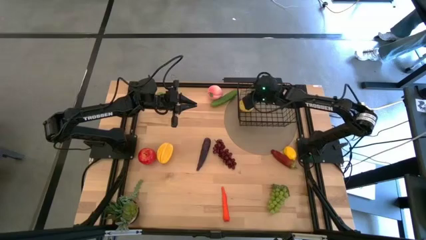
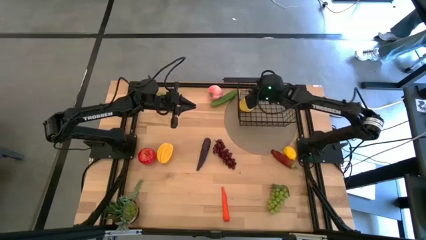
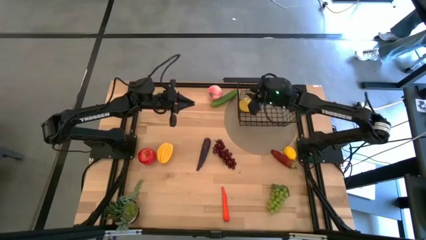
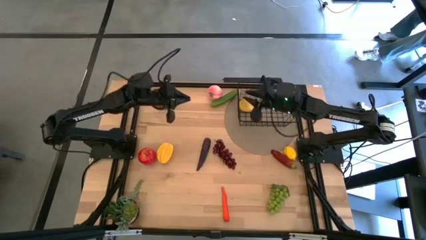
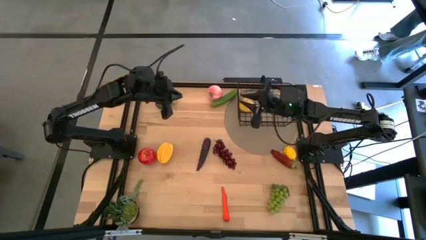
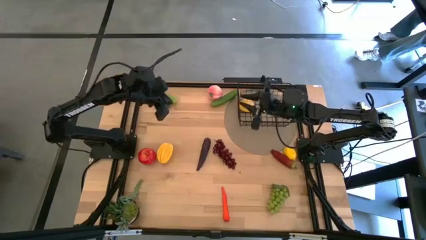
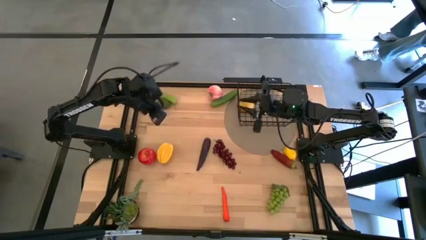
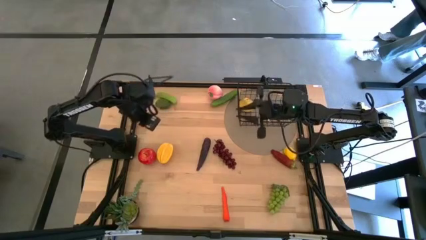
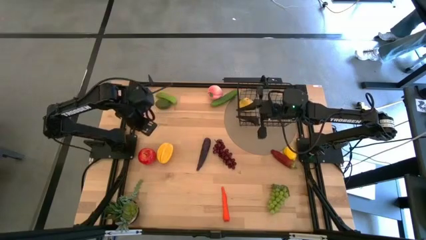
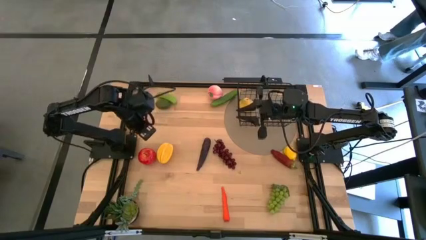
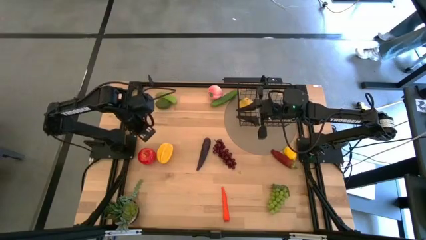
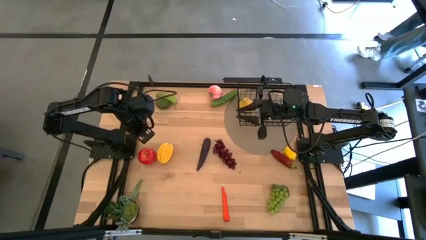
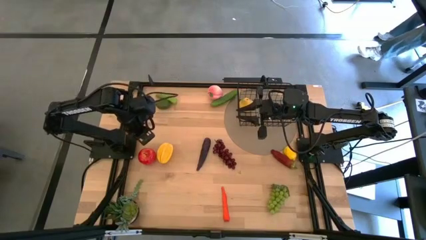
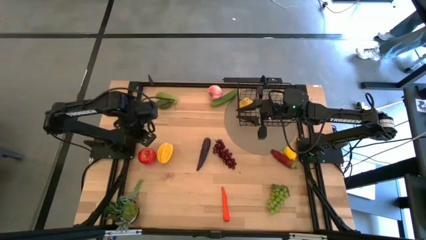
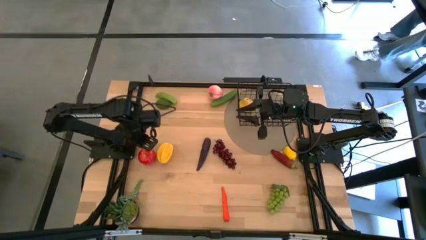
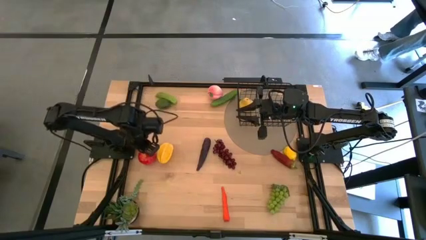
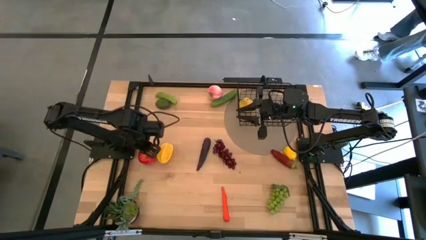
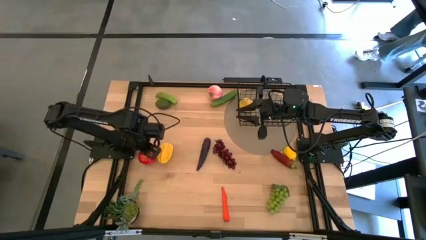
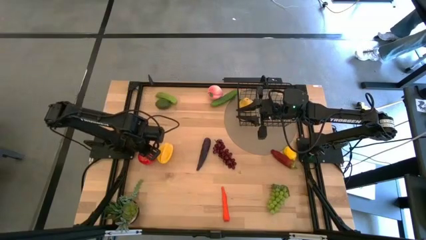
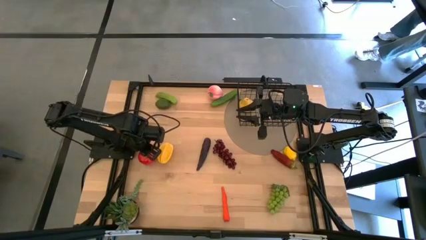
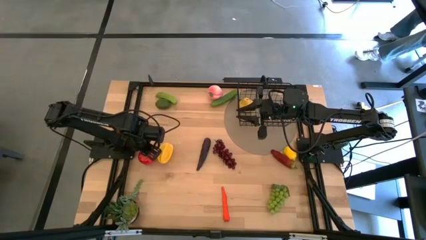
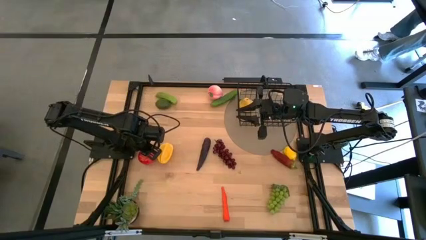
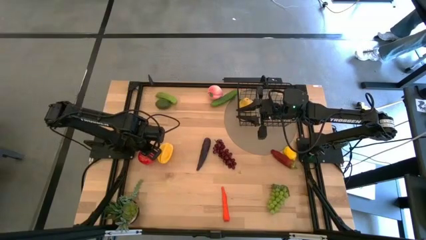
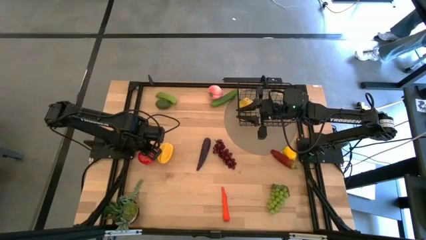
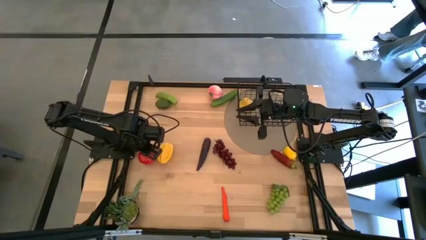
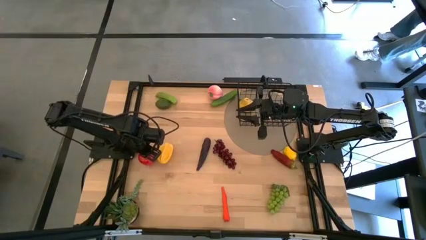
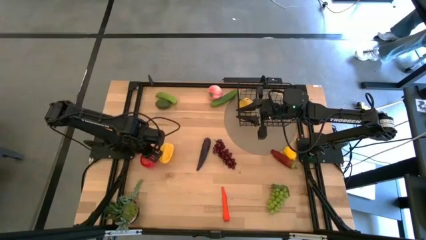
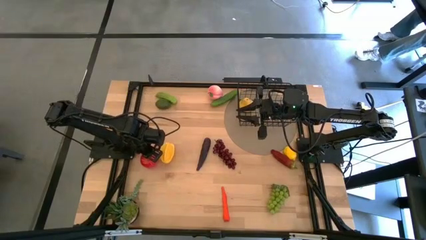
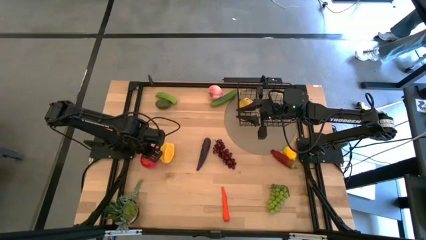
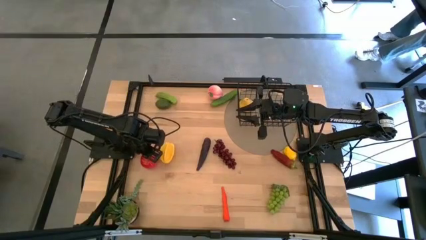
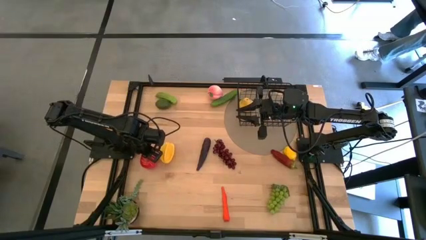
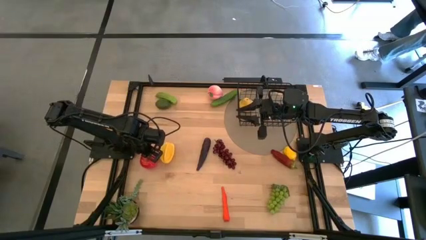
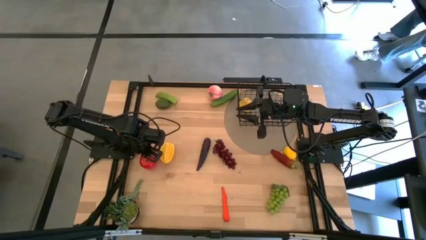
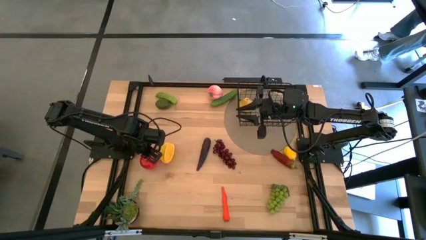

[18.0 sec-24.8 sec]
Task: Build produce basket
Put the red apple into the black wire basket

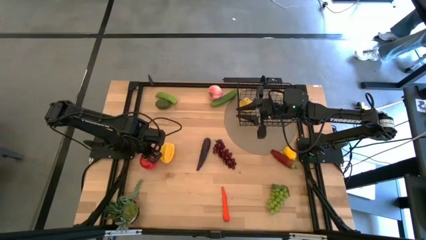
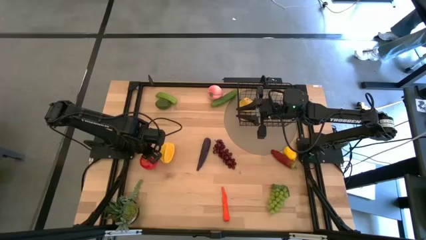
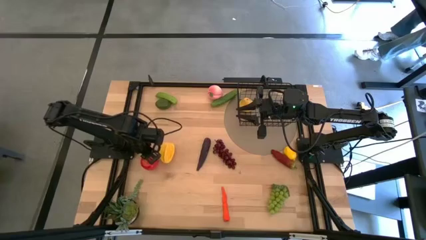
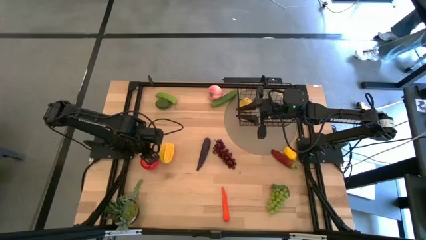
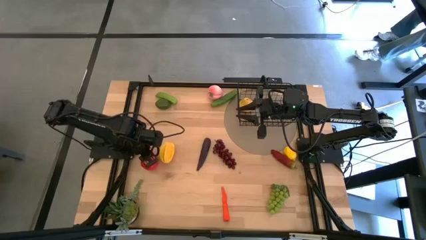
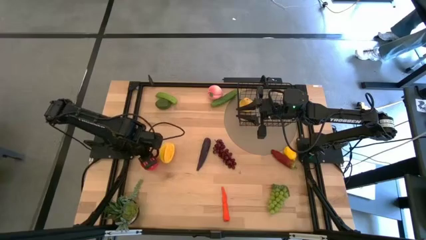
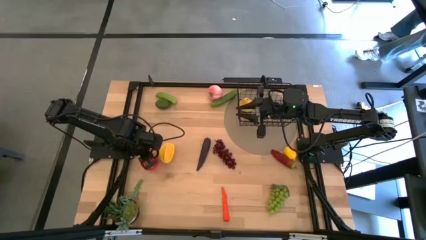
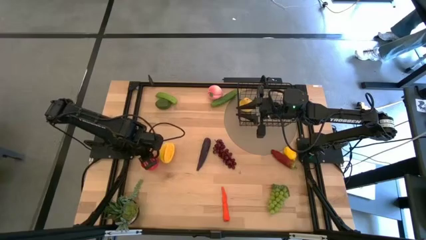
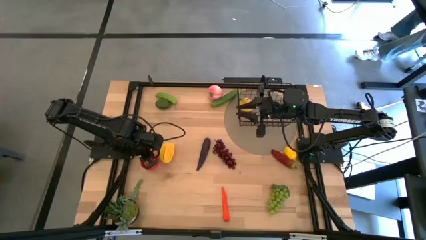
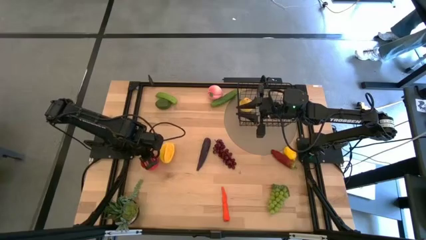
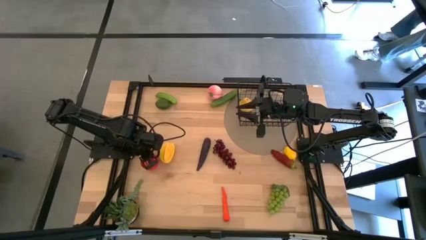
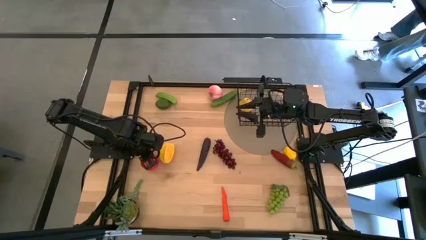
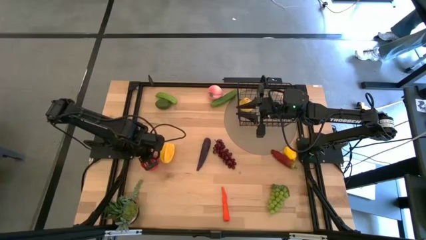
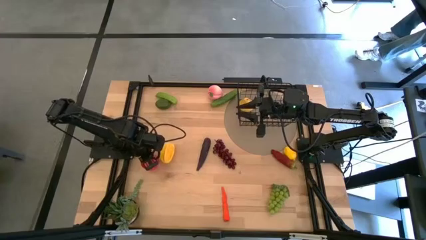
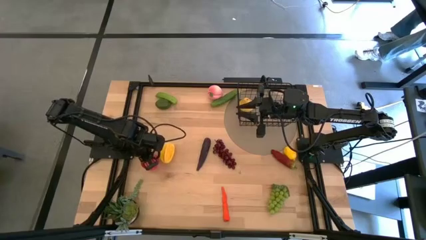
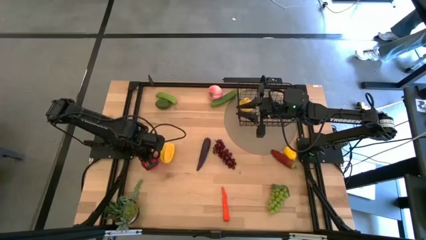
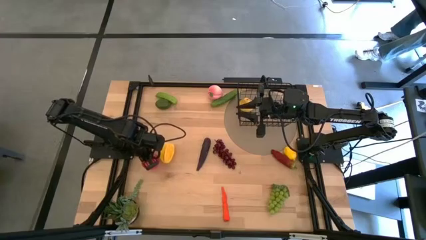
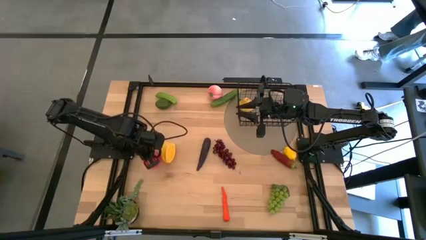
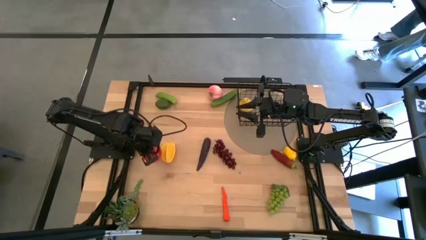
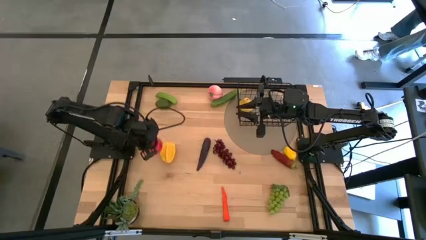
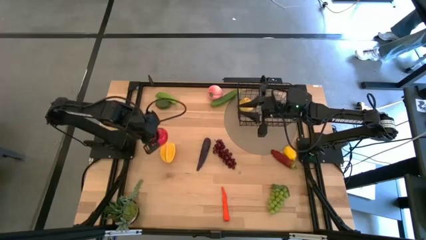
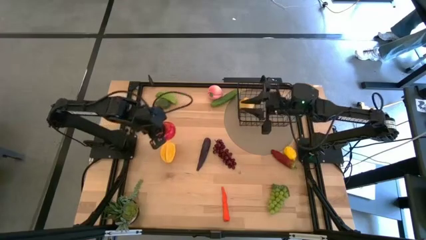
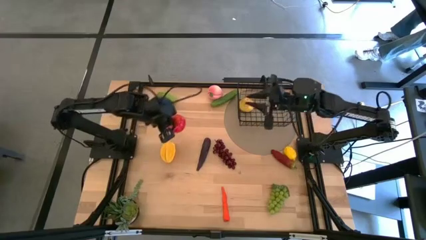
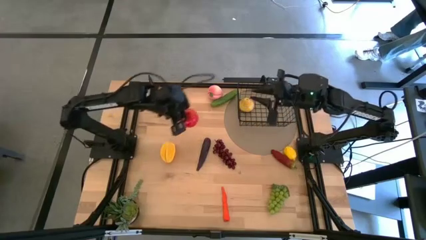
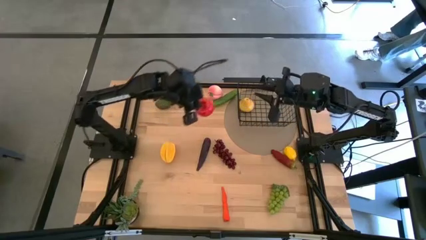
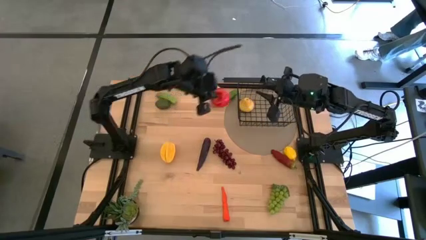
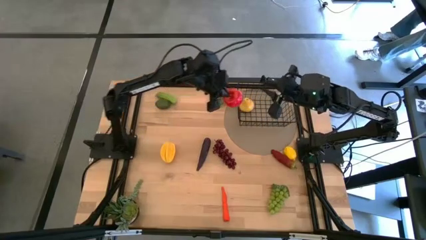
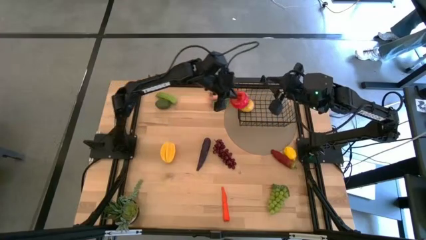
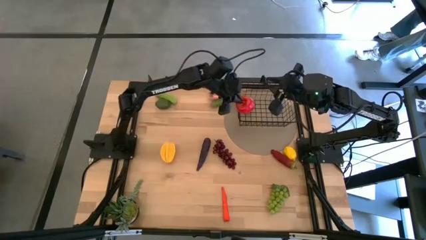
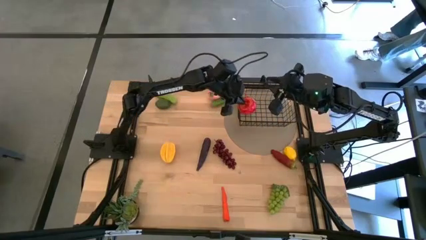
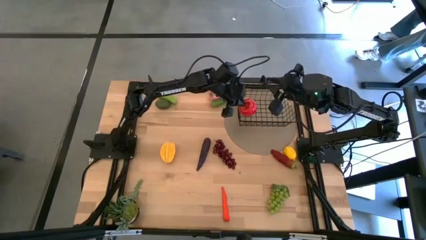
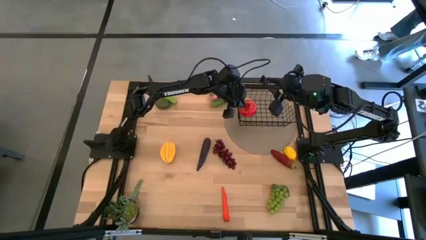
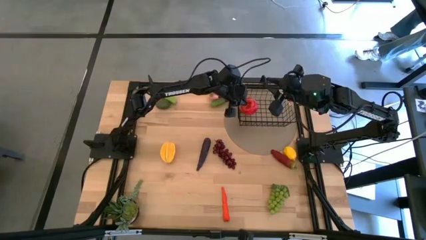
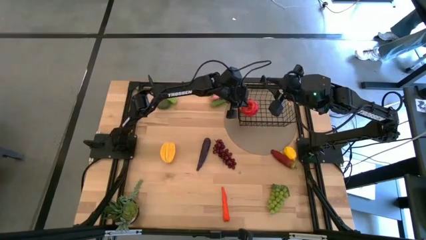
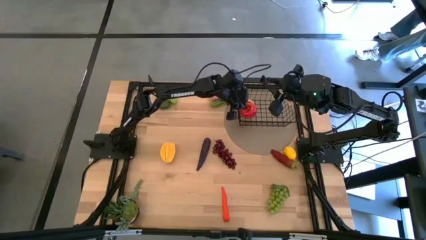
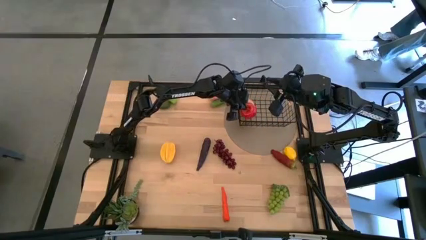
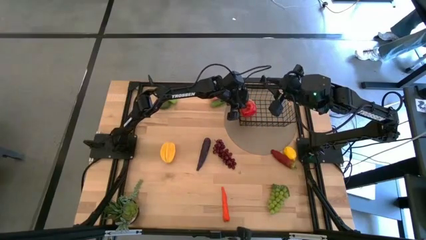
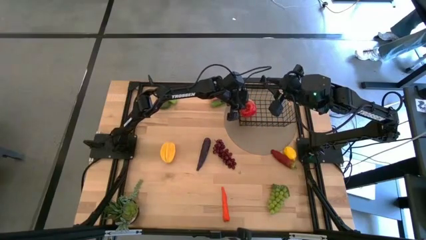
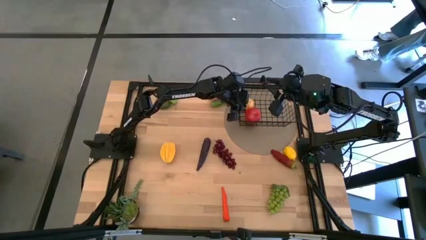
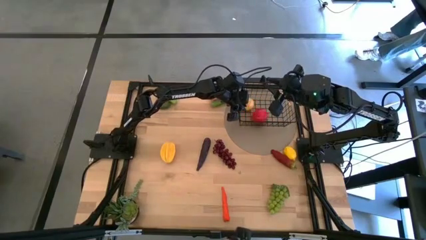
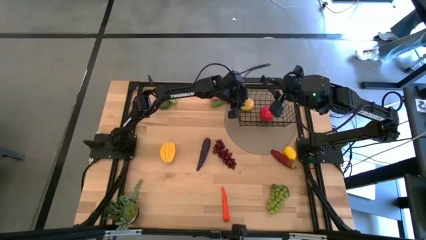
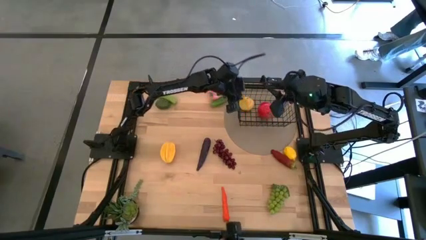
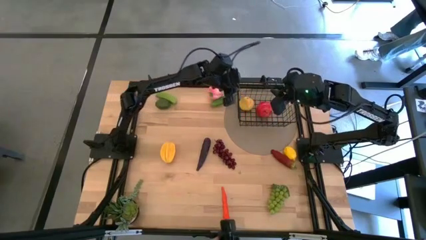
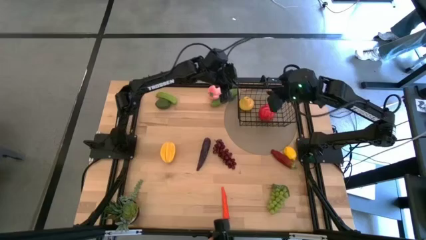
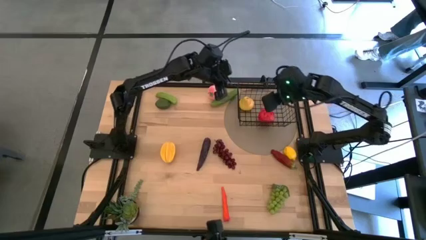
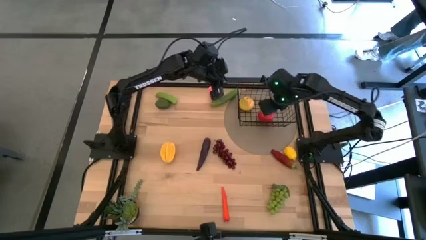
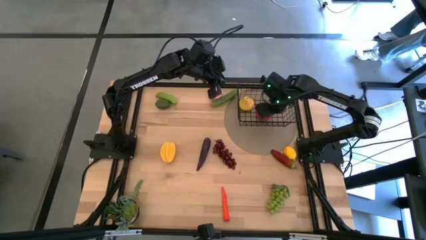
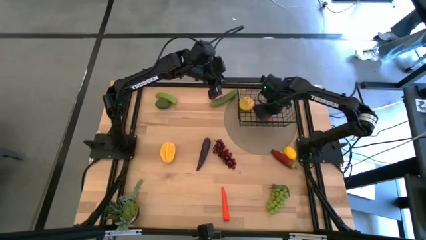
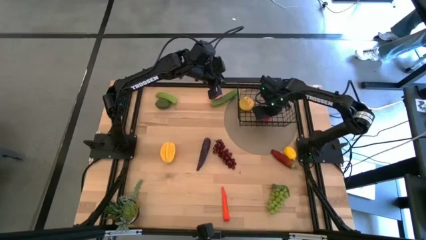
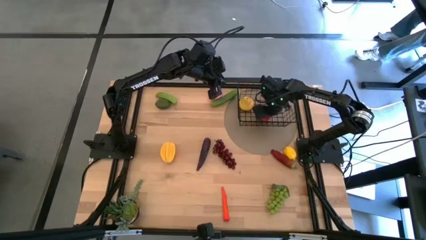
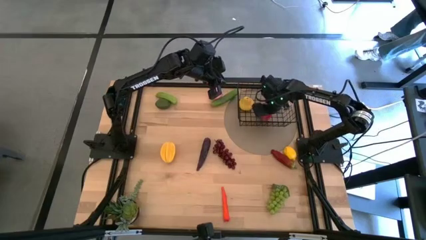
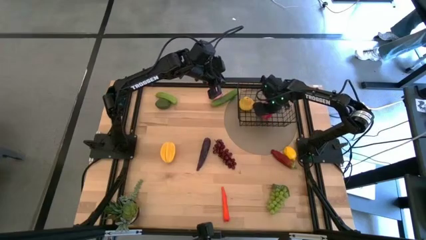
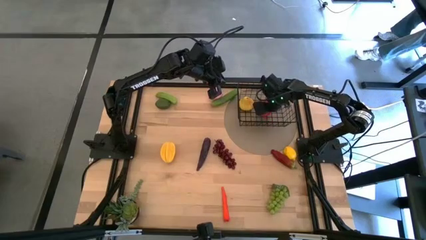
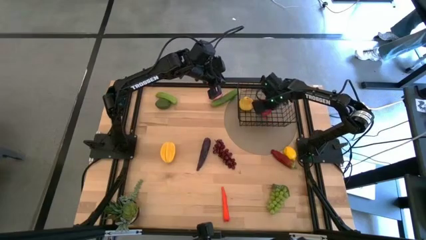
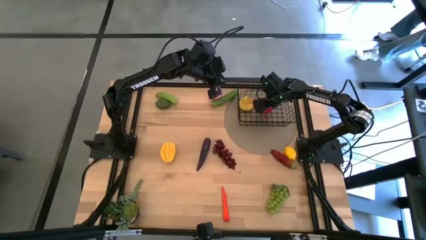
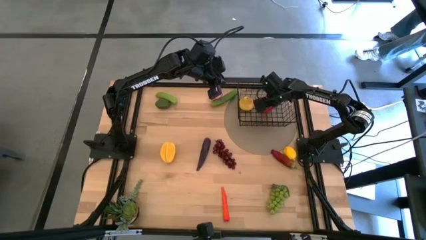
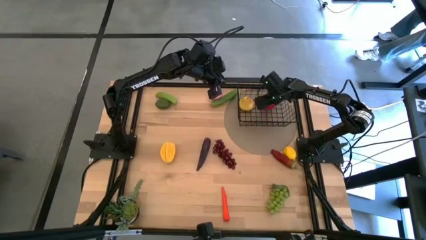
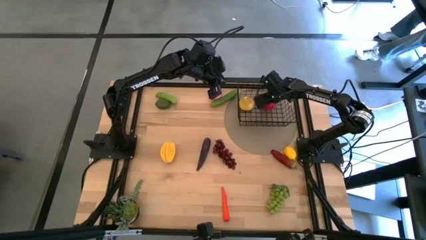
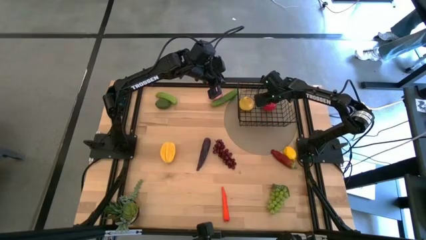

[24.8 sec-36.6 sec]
Put the red apple into the black wire basket
